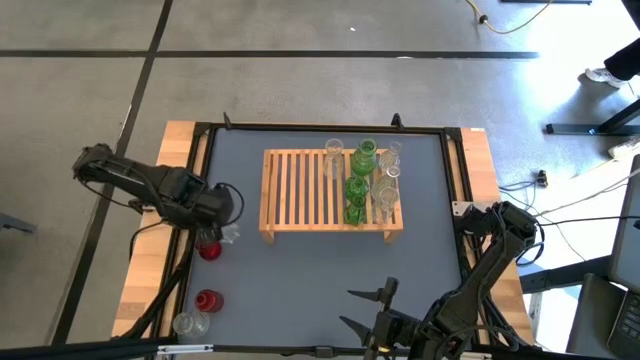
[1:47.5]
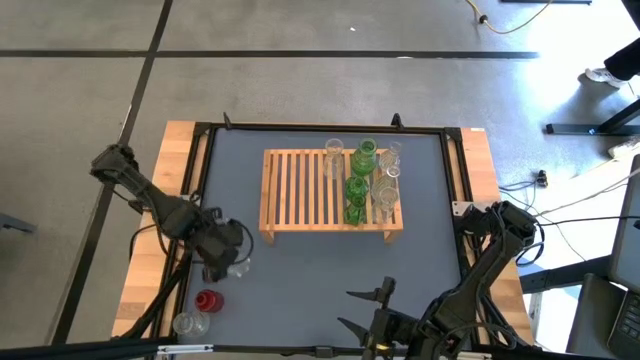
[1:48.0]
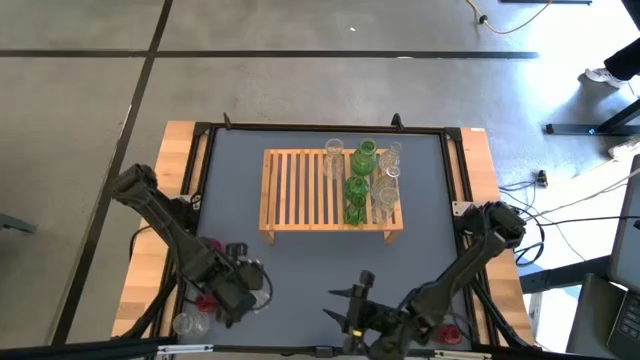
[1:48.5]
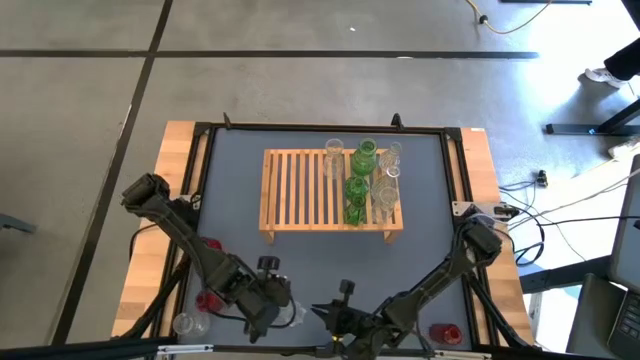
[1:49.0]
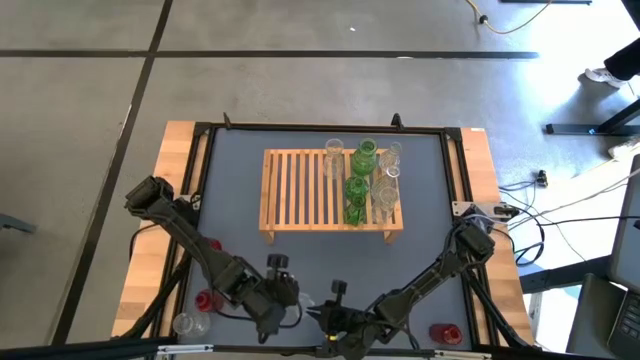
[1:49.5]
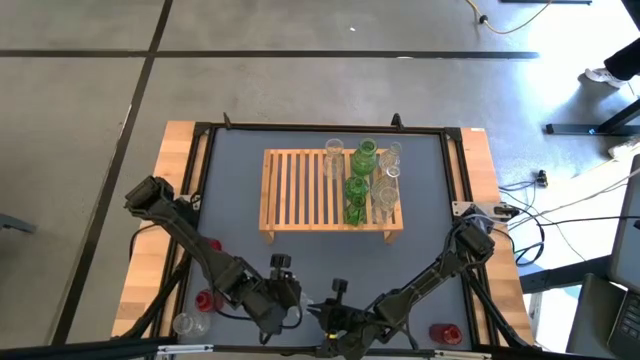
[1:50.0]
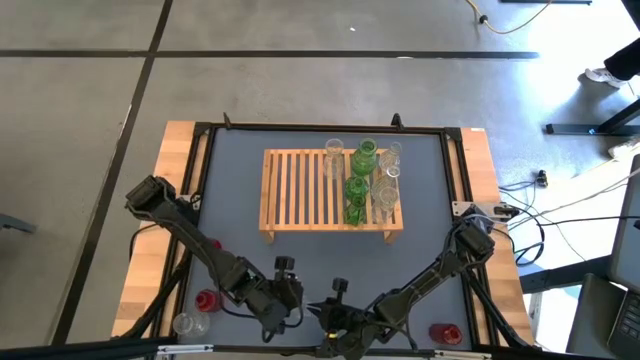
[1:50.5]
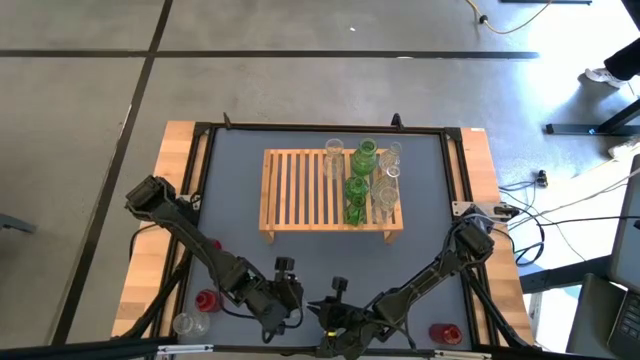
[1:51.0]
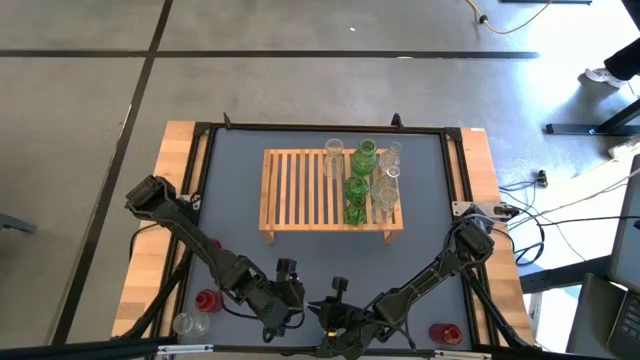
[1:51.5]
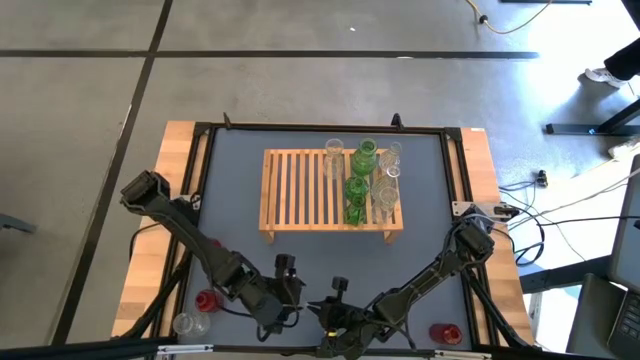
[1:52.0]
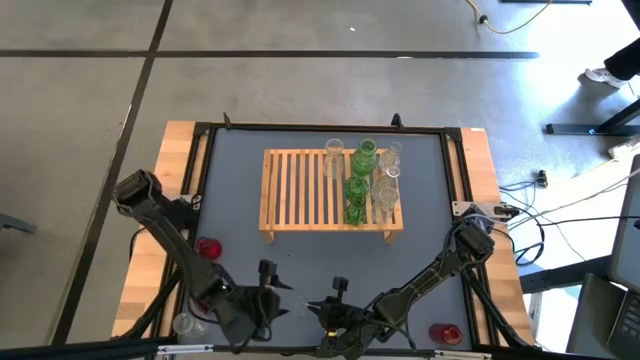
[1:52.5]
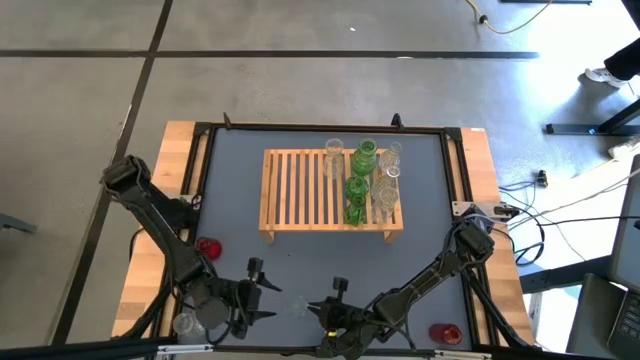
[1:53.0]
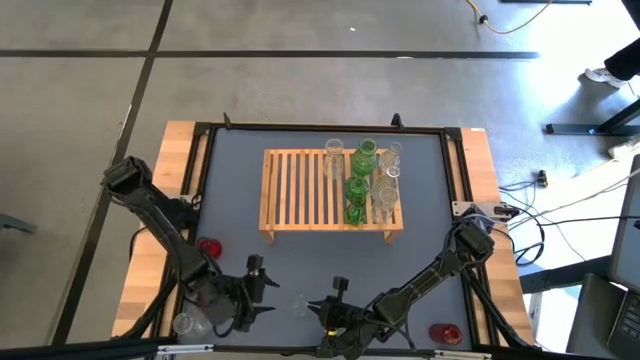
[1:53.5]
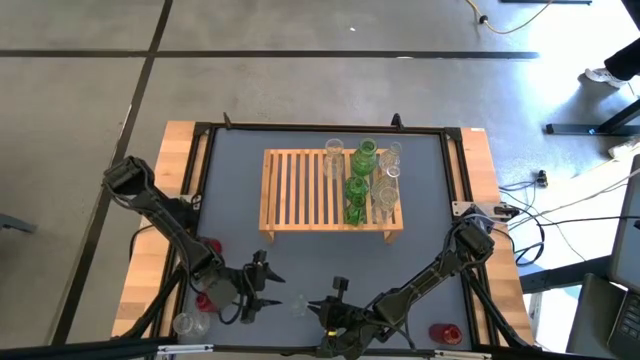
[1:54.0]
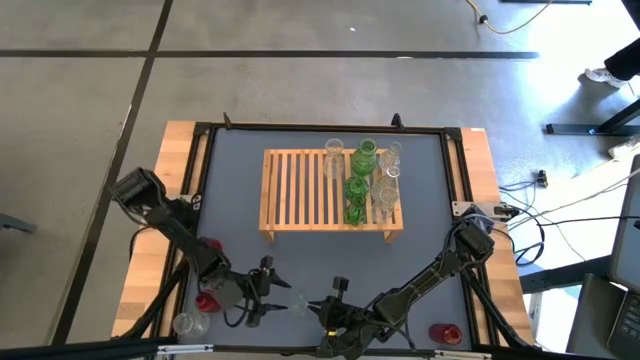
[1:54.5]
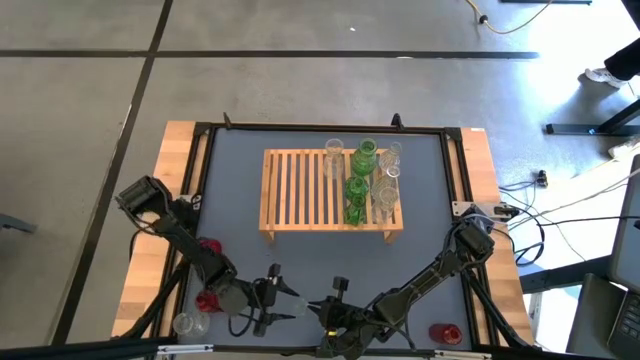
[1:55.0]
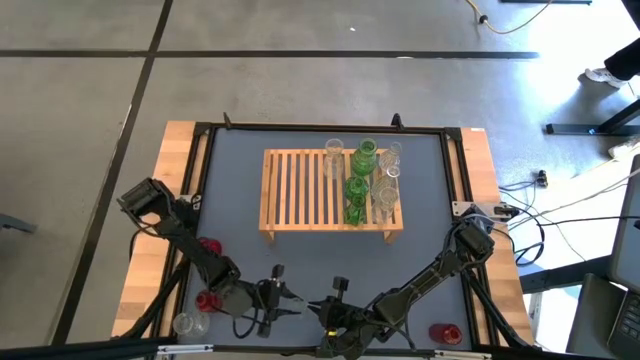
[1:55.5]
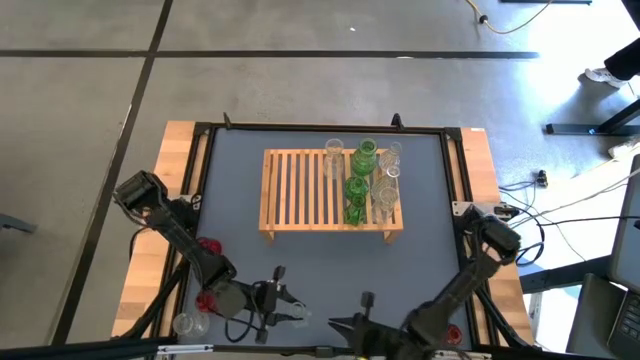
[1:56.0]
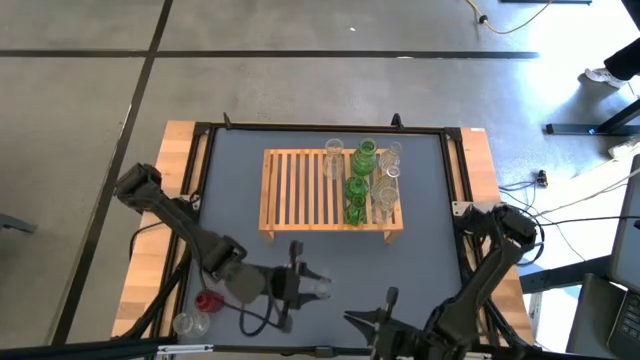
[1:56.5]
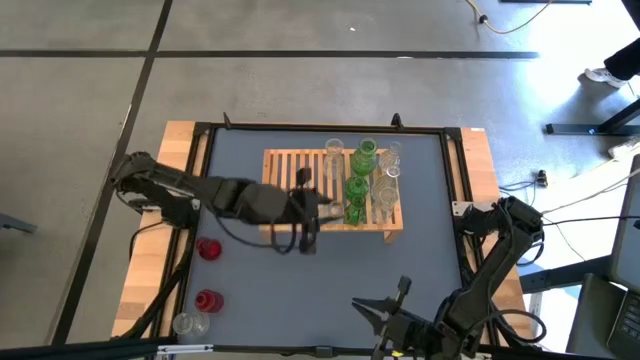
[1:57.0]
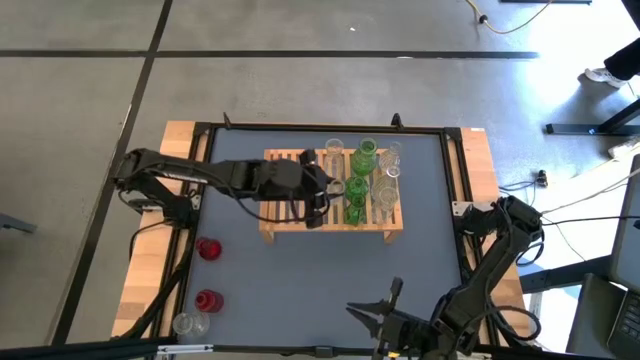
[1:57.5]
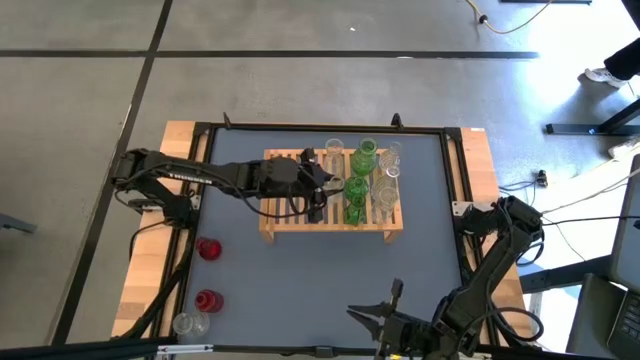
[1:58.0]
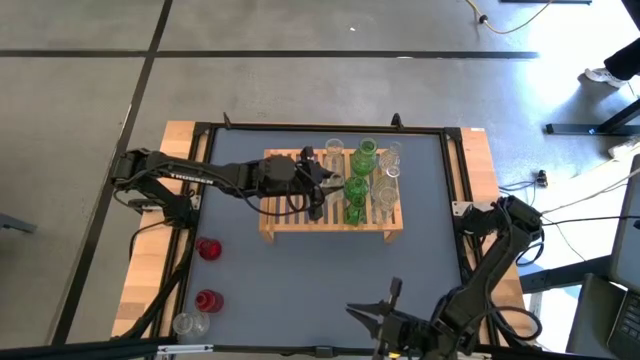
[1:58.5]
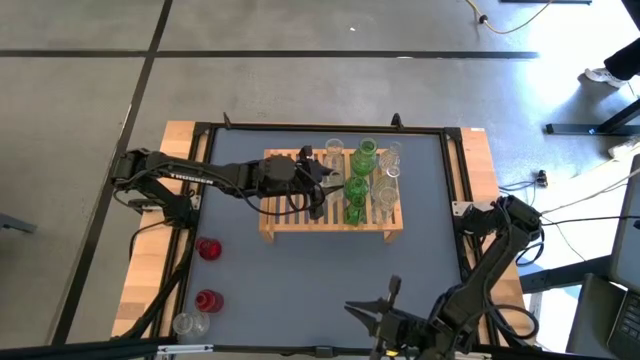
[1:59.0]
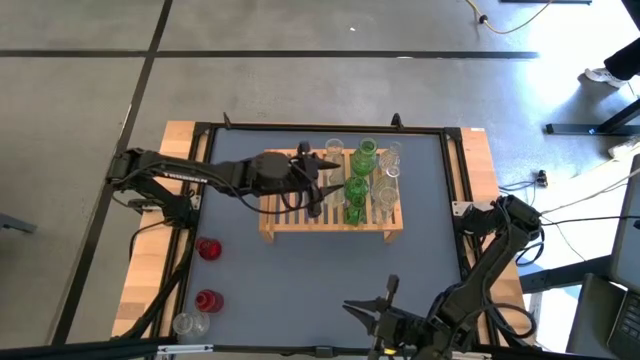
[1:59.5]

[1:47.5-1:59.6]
Task: sort vases onto shelf
Put the transparent bottle on the shelf

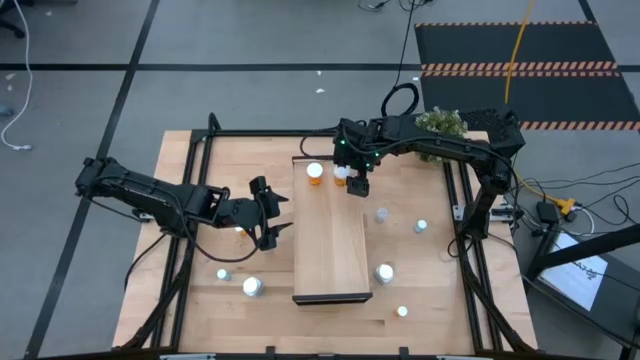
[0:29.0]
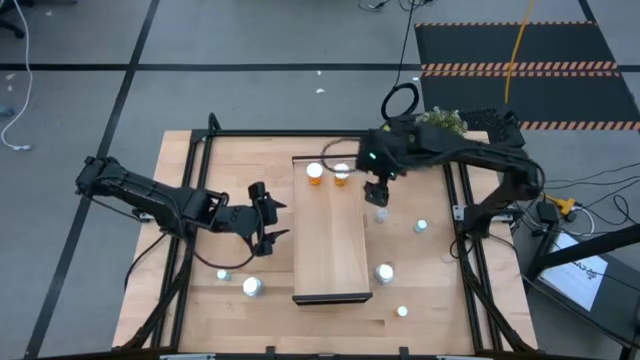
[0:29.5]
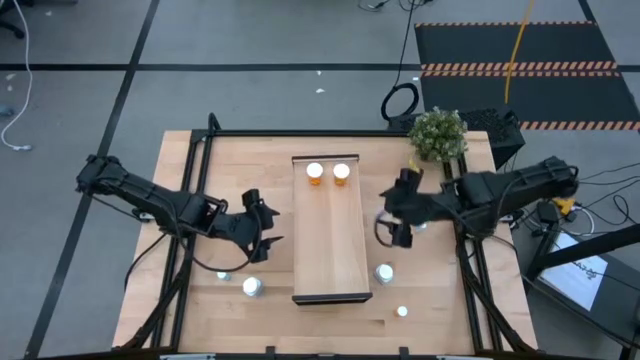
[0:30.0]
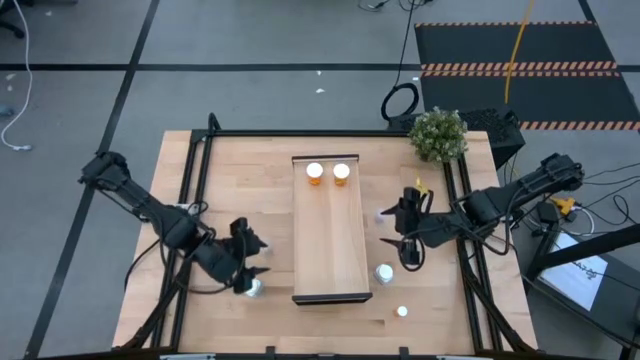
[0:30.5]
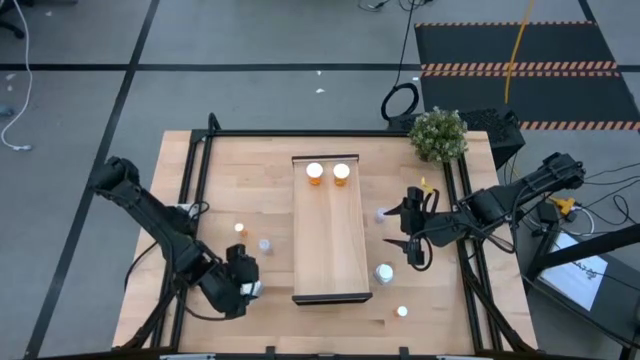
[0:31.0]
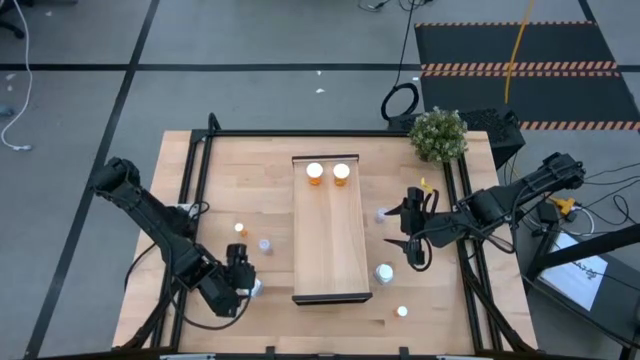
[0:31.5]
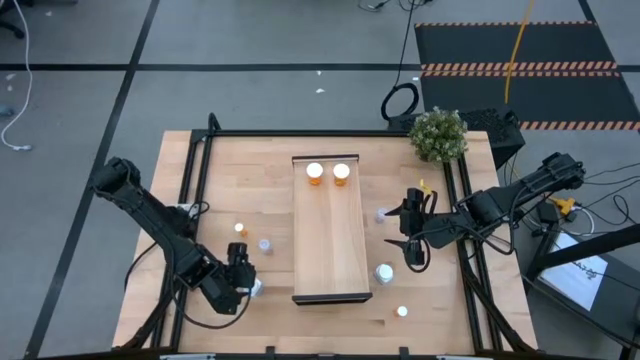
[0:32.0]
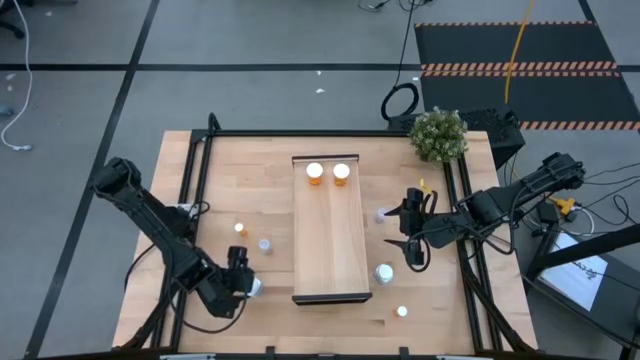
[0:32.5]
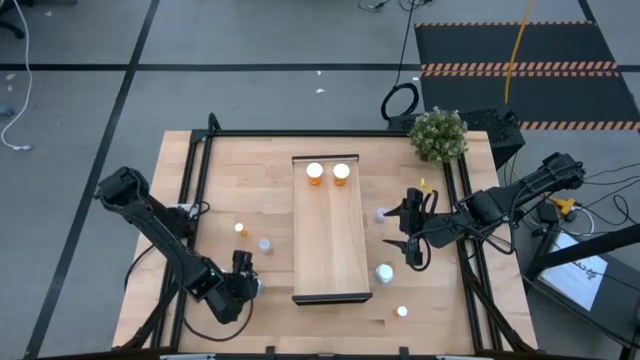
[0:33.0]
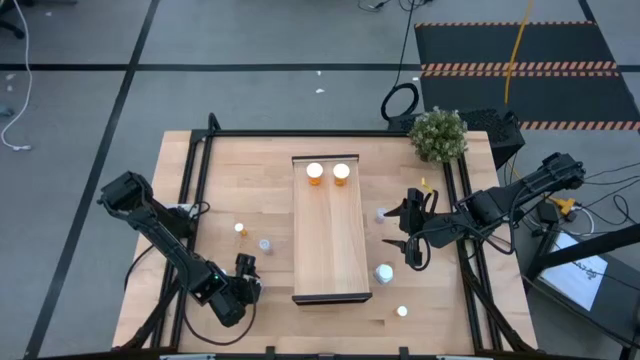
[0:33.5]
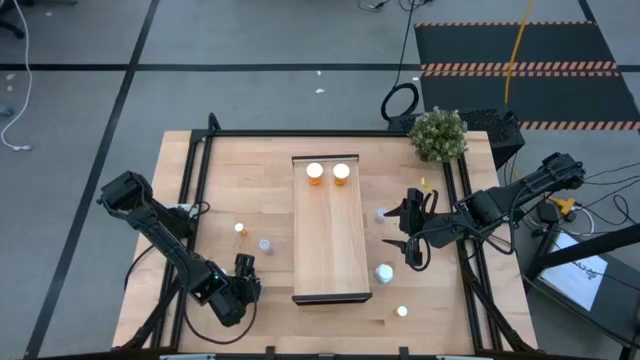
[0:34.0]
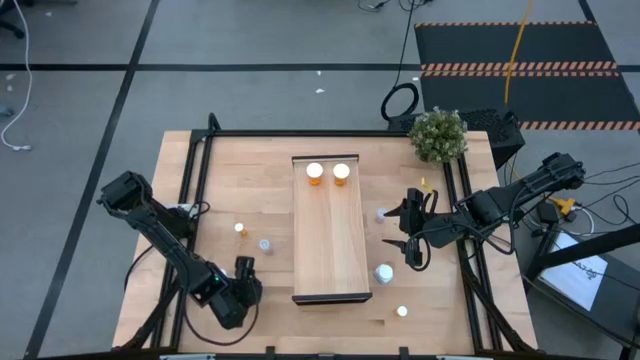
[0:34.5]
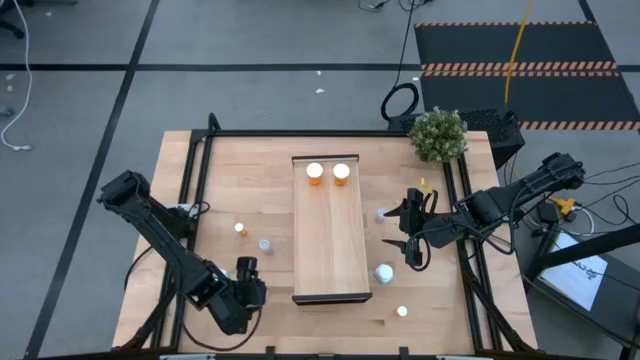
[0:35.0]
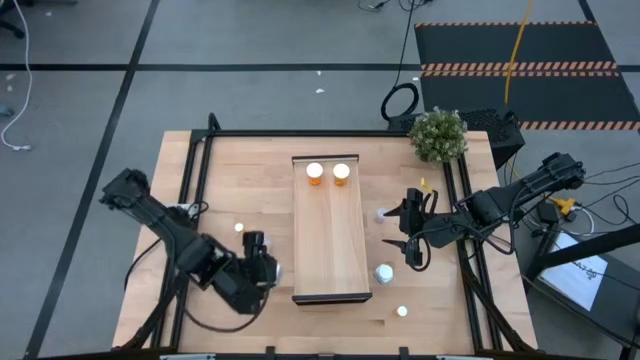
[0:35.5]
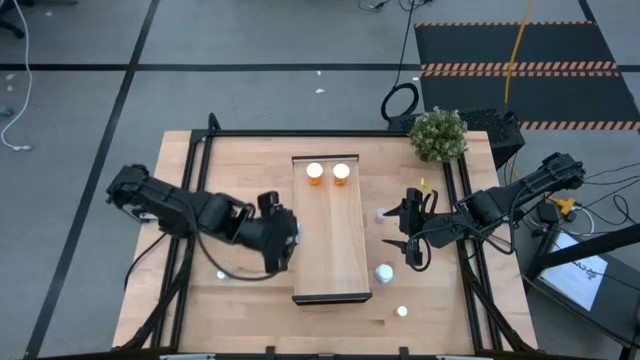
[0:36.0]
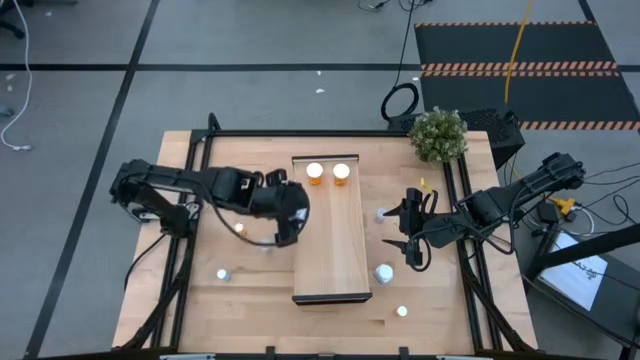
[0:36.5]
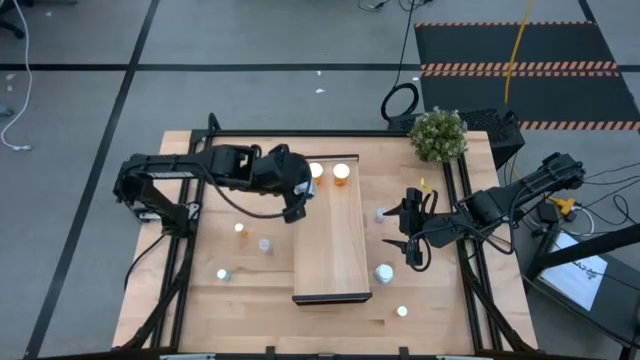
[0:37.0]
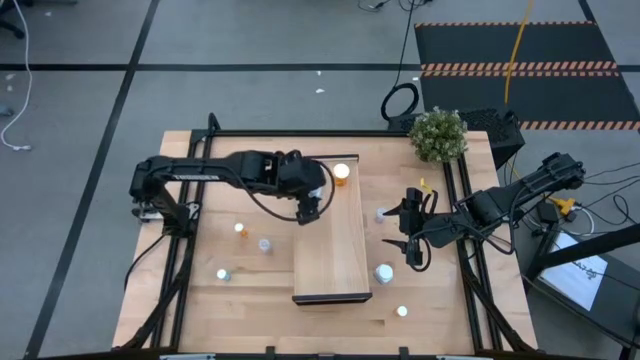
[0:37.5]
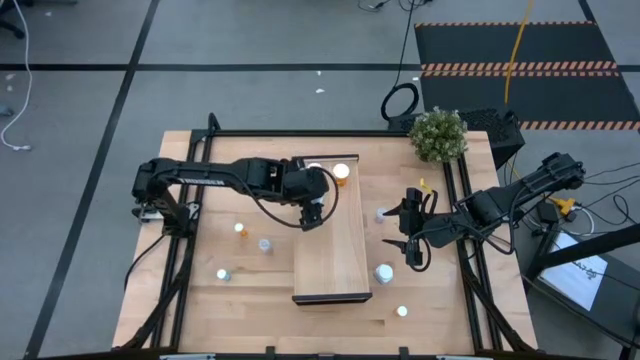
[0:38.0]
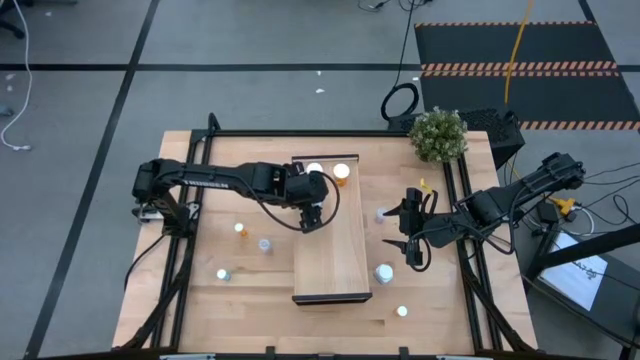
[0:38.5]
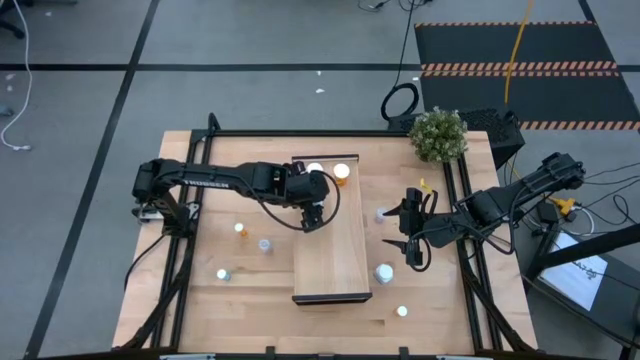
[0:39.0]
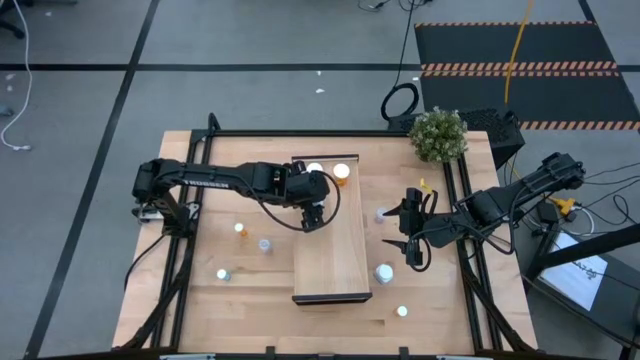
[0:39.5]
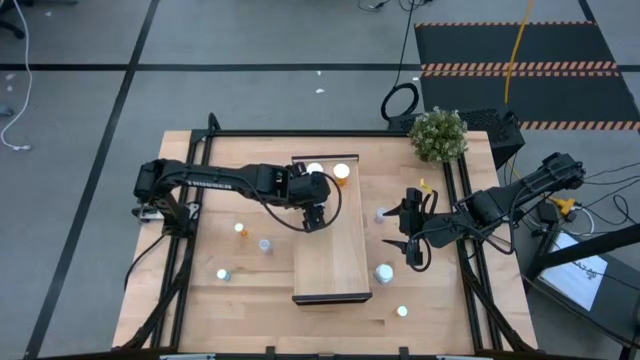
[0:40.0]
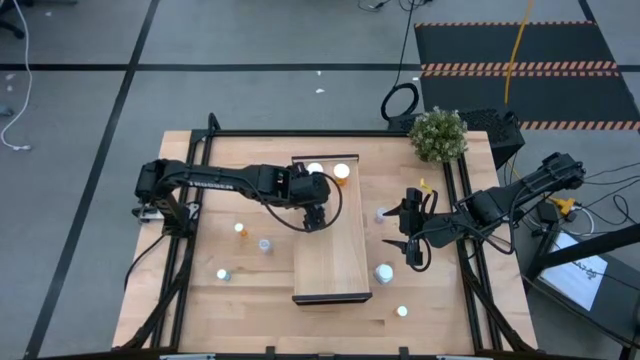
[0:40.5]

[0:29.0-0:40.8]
Task: Pick and place medicine bottles onto shelf by color
Put the left white medicine bottle on the shelf
